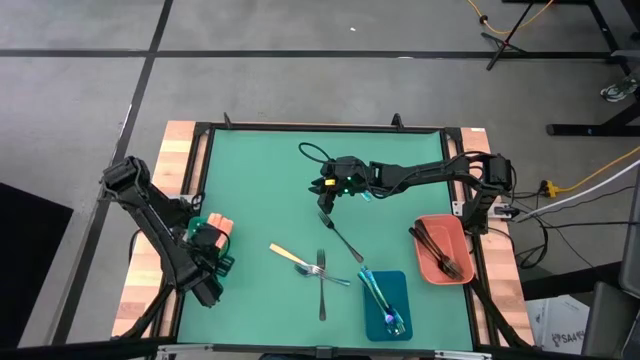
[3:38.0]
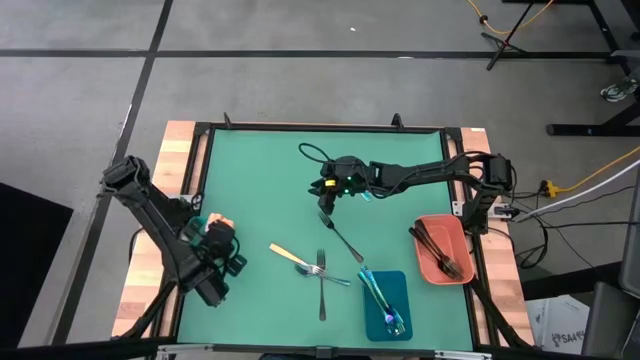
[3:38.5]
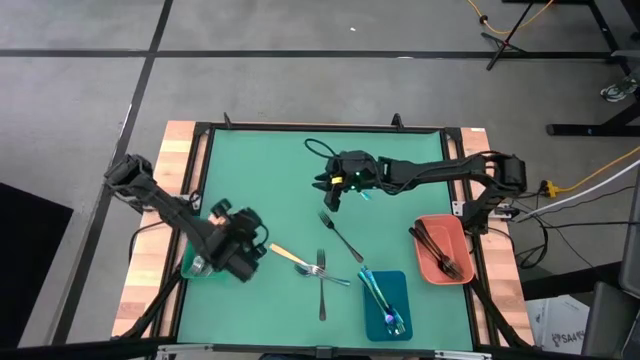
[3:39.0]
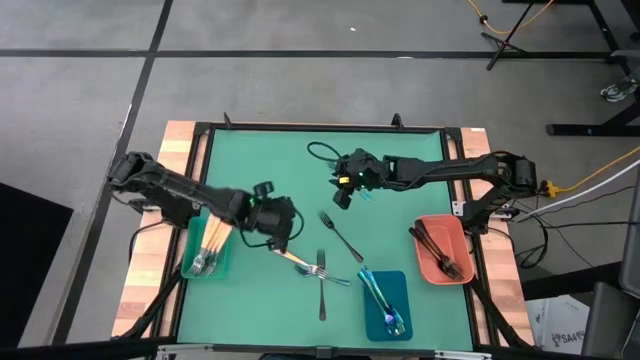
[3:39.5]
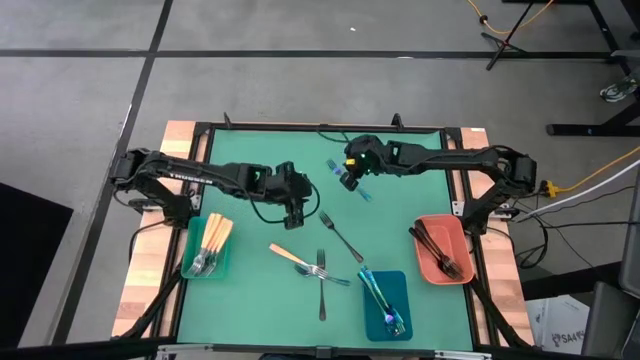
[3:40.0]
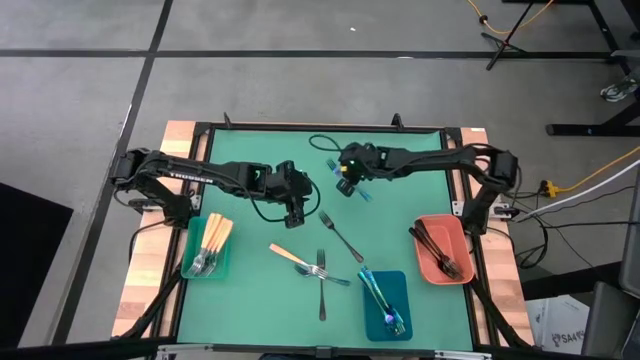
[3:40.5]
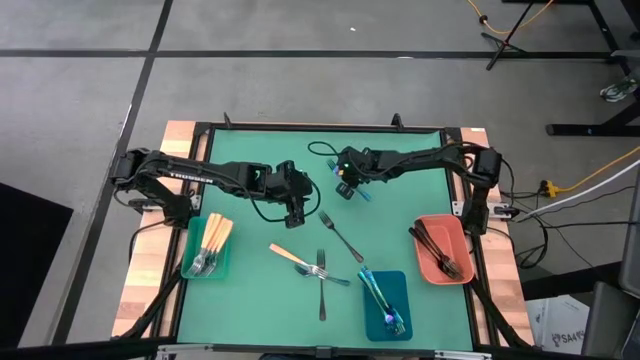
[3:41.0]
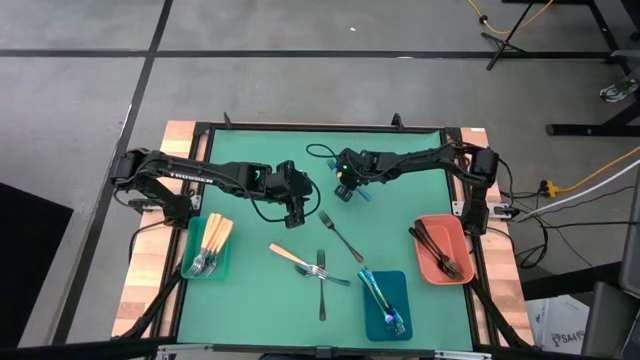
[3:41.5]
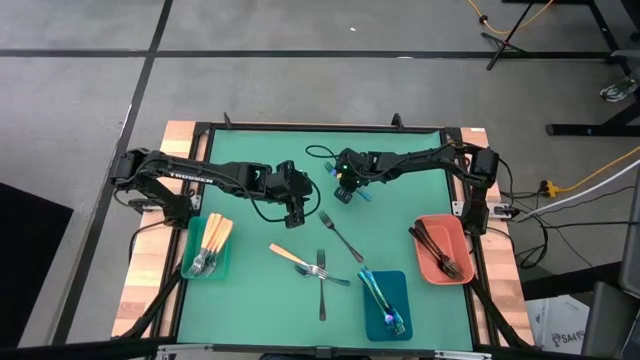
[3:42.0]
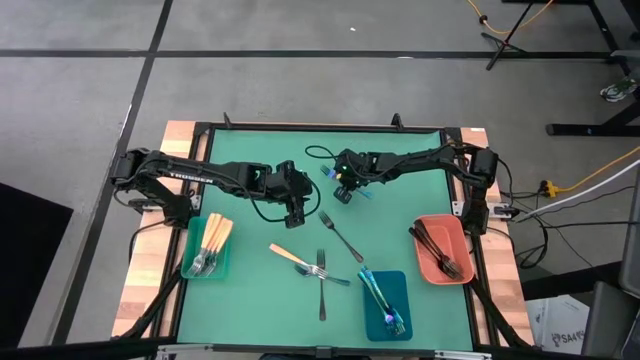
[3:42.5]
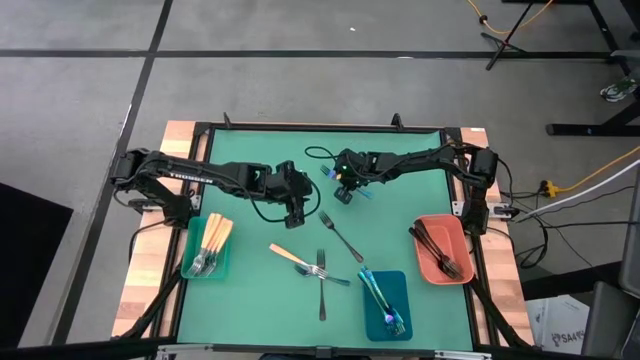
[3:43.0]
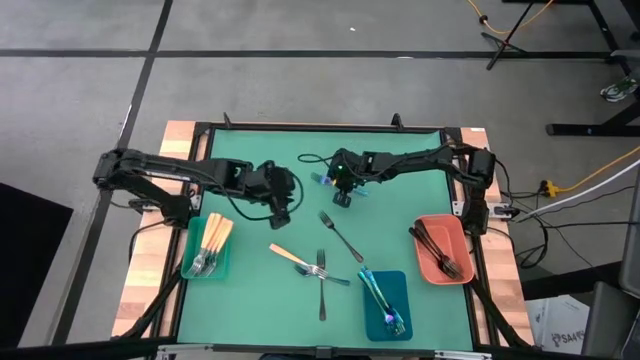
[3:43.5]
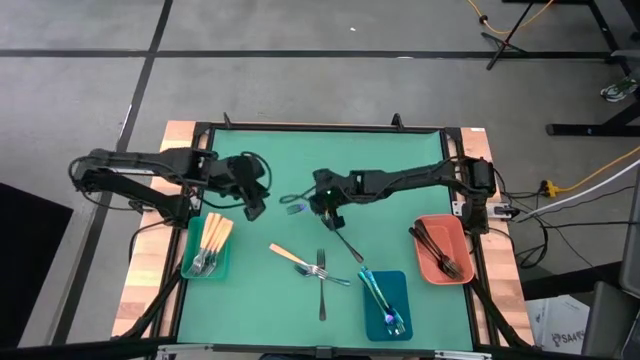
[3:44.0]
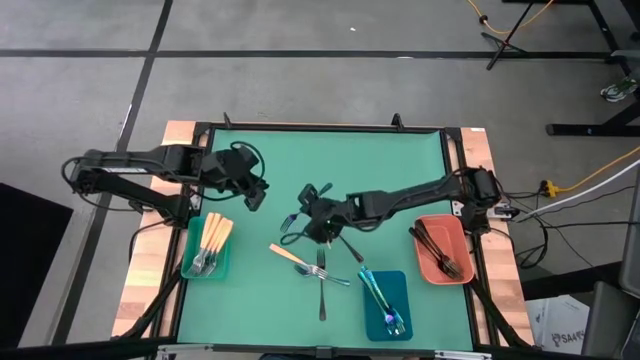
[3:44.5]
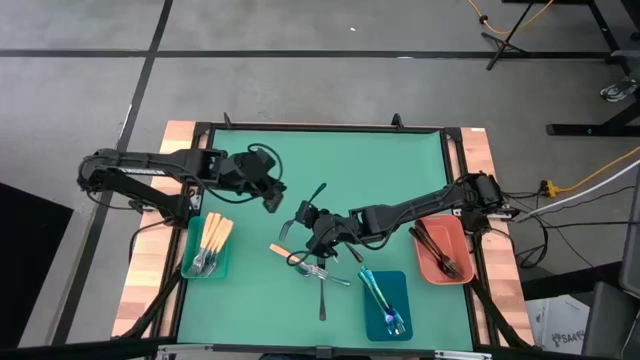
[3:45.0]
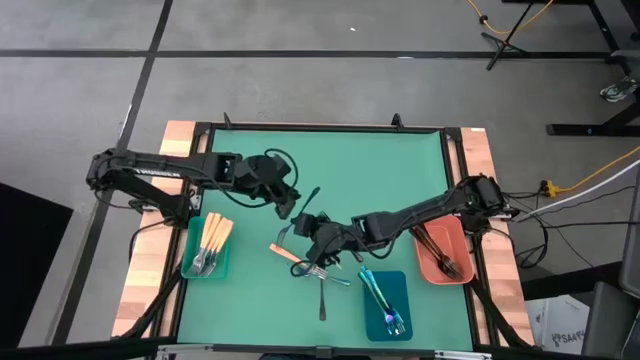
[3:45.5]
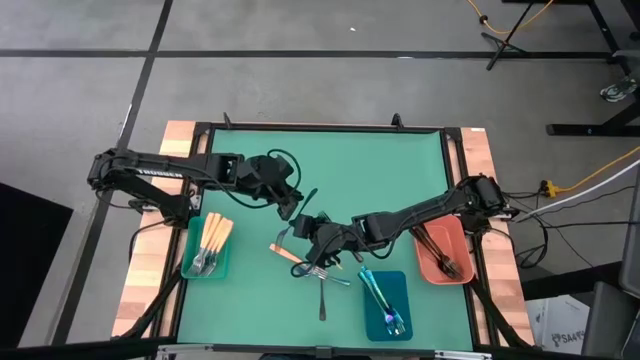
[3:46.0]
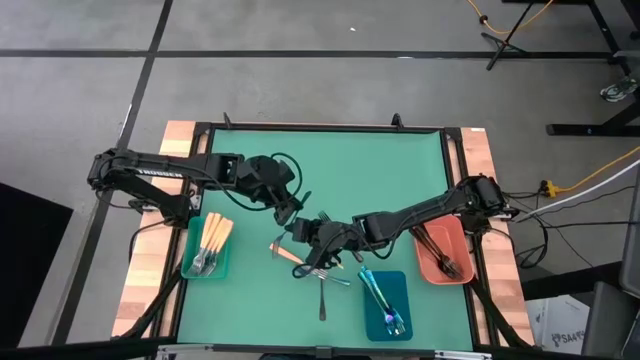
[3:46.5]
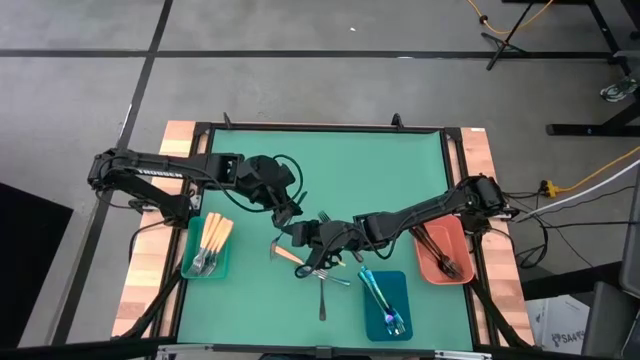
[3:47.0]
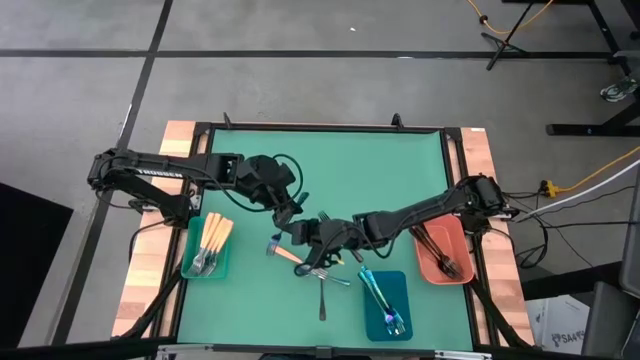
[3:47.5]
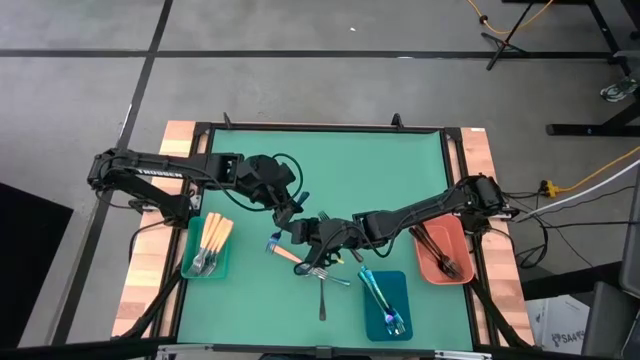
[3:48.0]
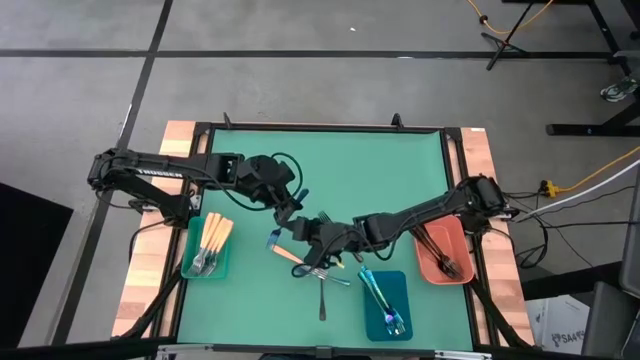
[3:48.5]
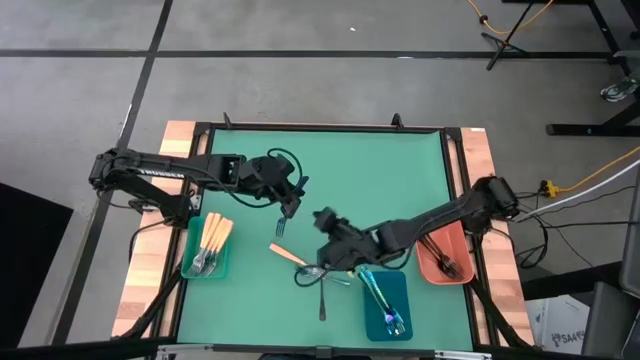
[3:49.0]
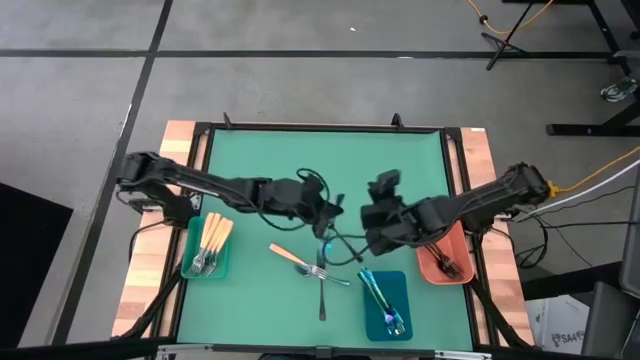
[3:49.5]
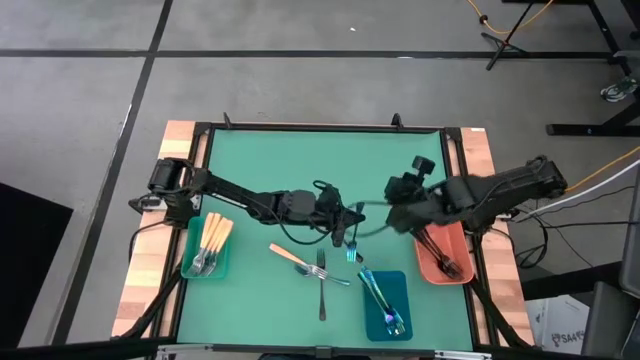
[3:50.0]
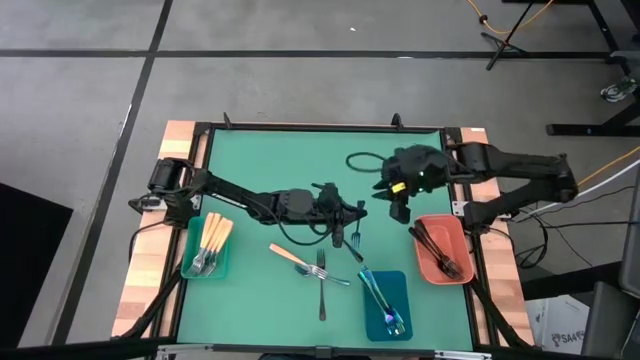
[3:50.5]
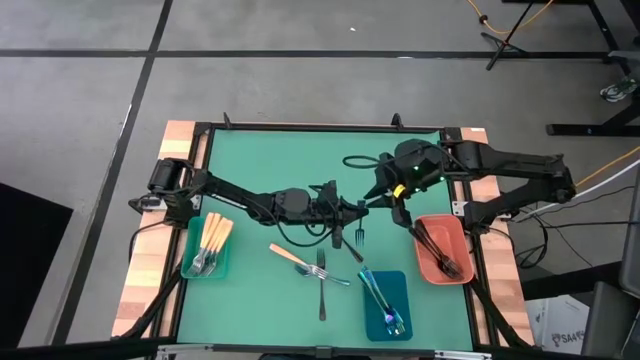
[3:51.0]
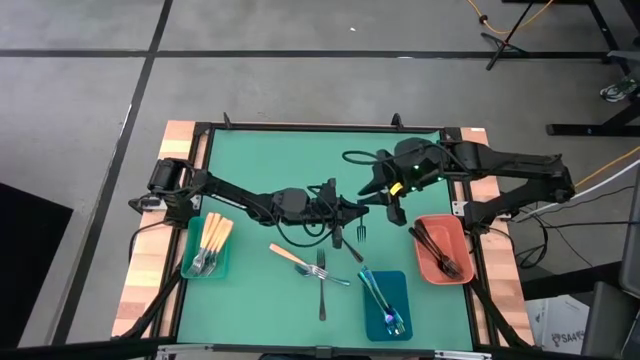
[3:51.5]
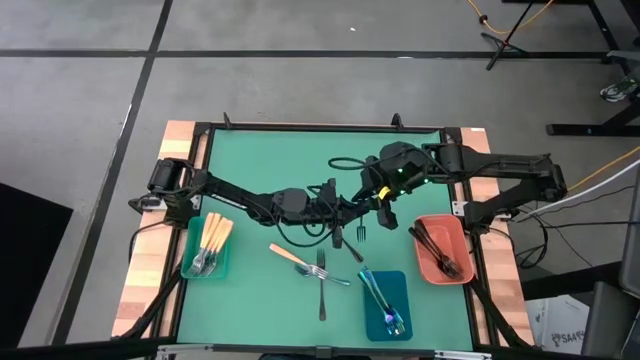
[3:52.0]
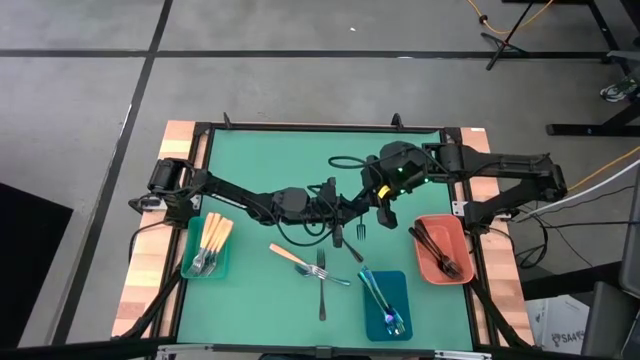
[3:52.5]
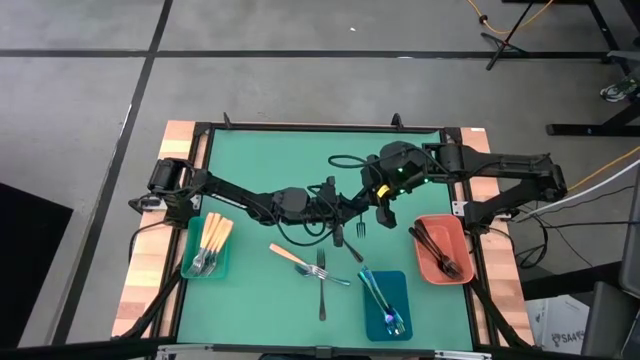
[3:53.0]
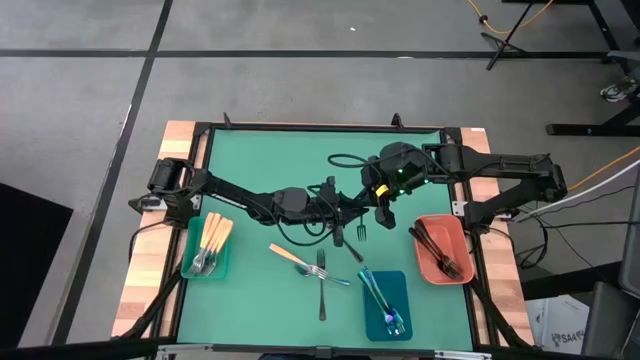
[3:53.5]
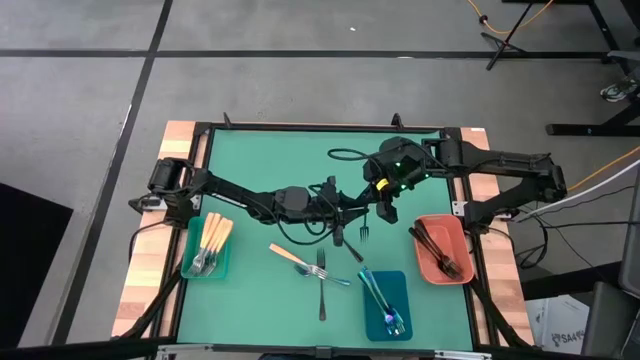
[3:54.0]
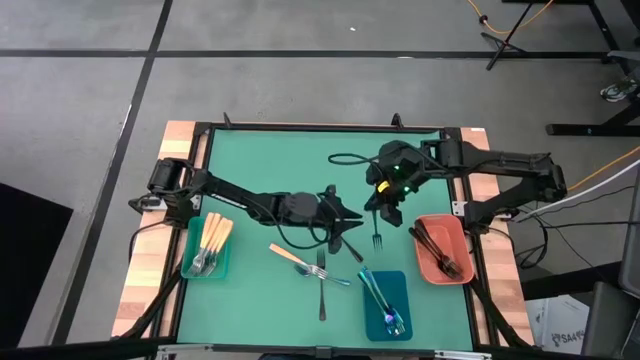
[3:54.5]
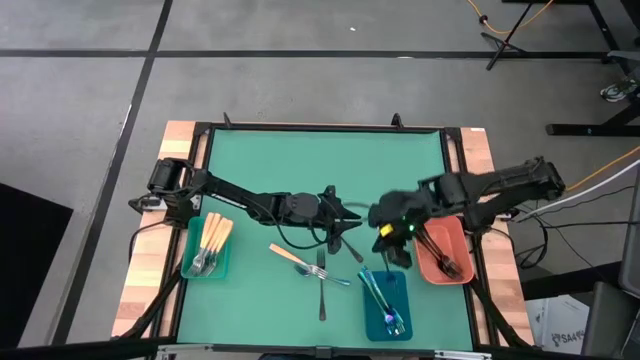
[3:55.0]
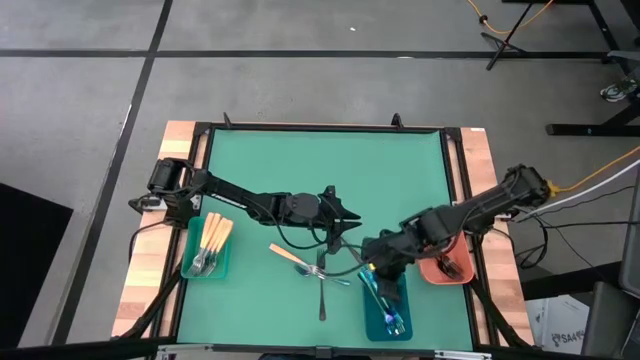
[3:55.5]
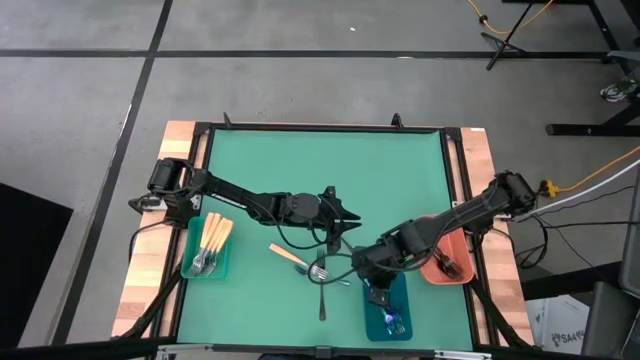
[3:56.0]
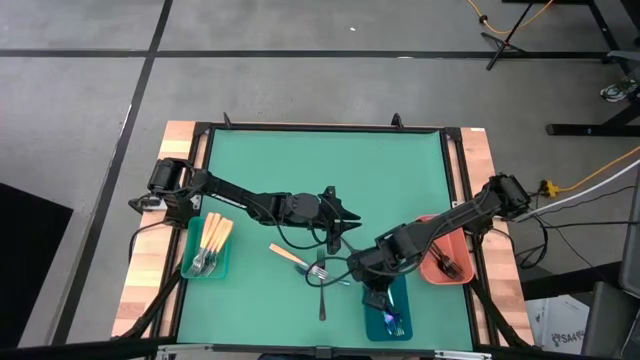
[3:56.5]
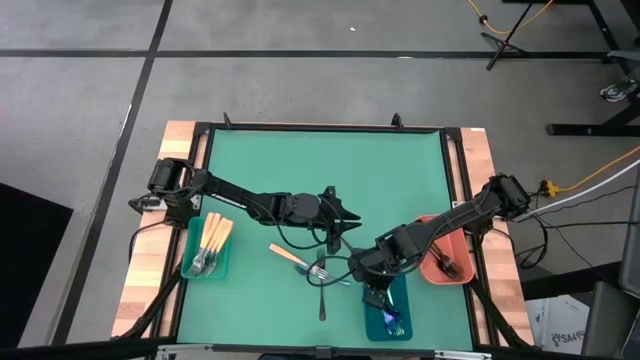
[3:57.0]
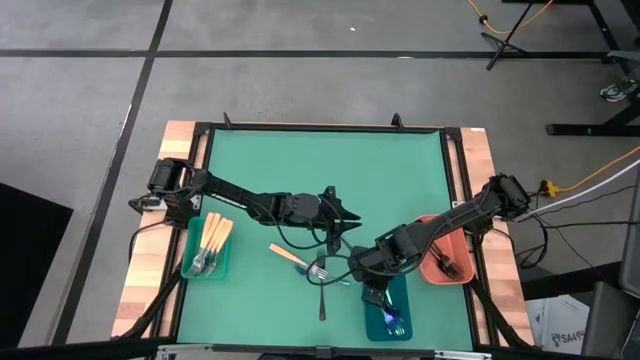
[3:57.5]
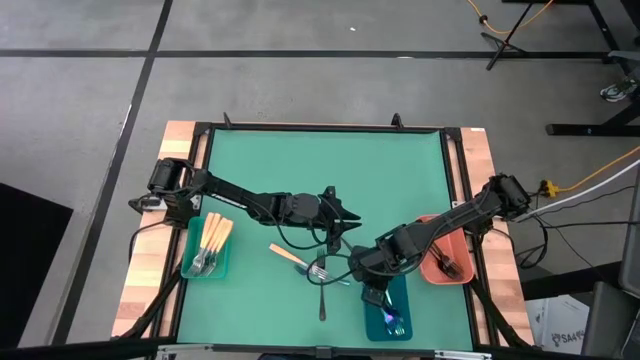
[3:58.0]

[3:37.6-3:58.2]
Task: Sort silverware by color (type)
Put the blue fork into the blue bin
